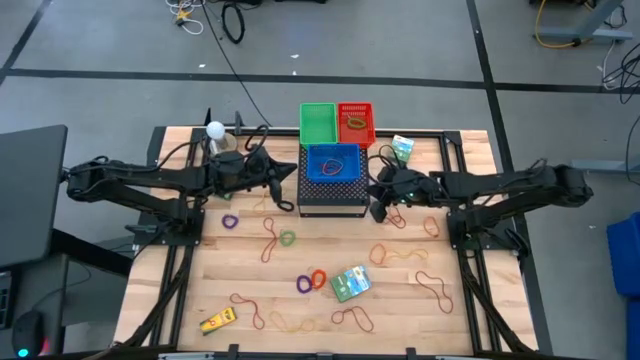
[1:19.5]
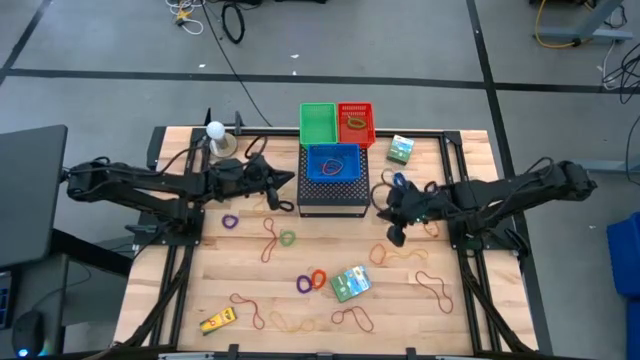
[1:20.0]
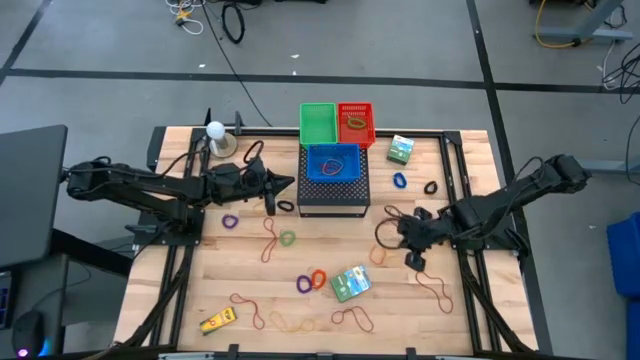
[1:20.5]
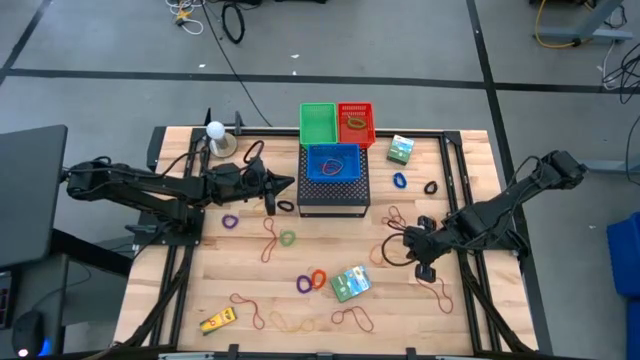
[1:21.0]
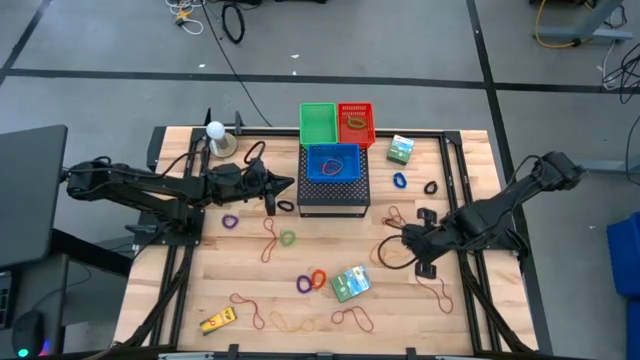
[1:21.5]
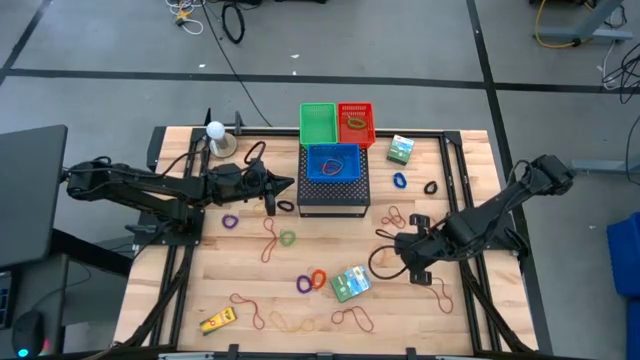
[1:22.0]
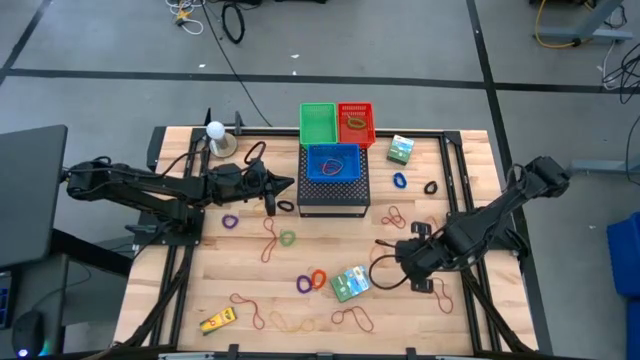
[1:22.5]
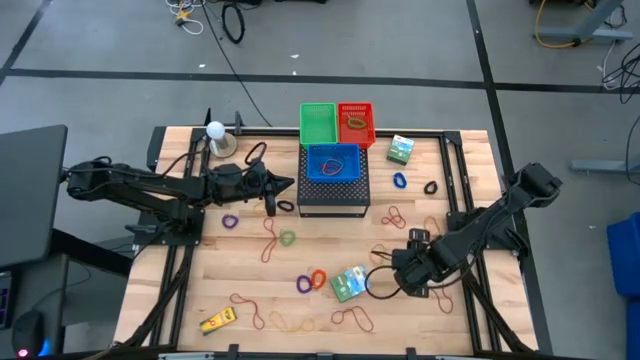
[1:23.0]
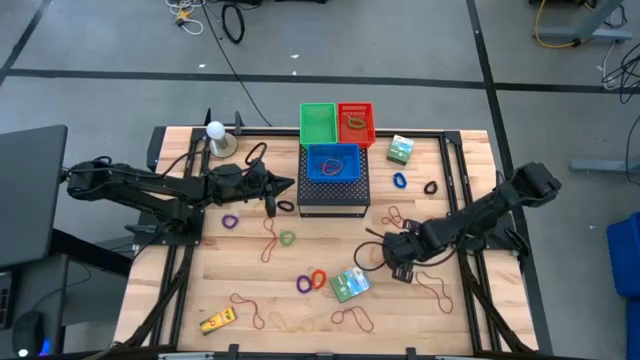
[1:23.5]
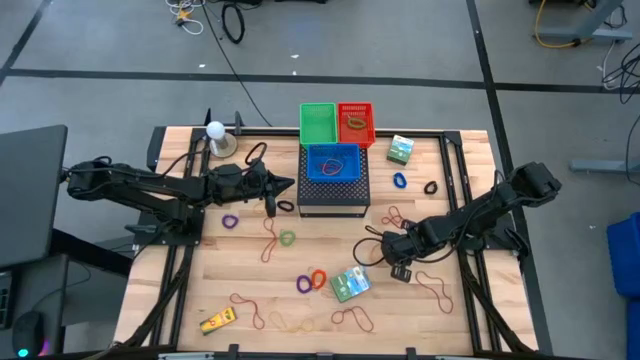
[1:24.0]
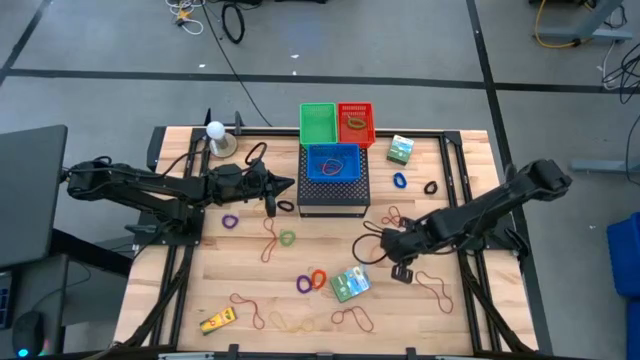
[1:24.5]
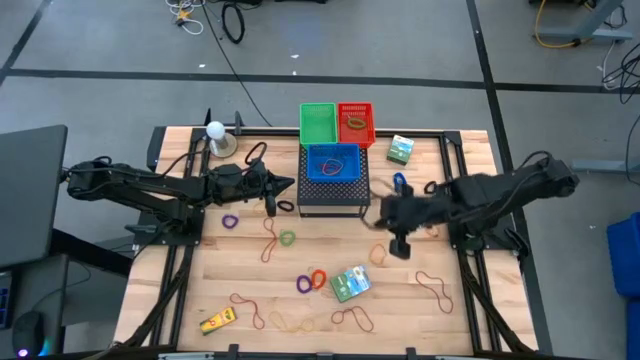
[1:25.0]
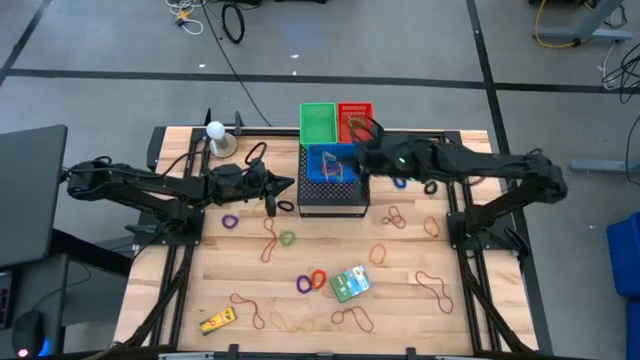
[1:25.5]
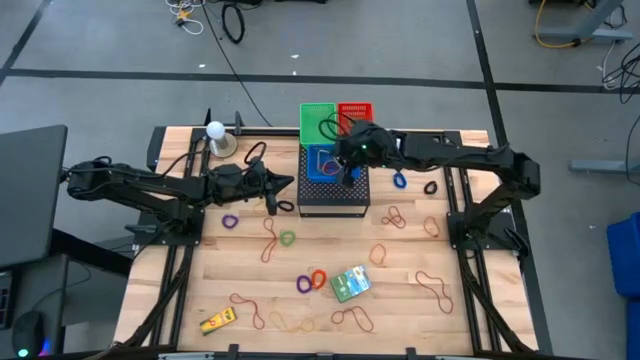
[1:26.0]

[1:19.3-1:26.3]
Task: Pick & Place Office Desk Supplies
Put the yellow rubber band into the blue bin on the shelf

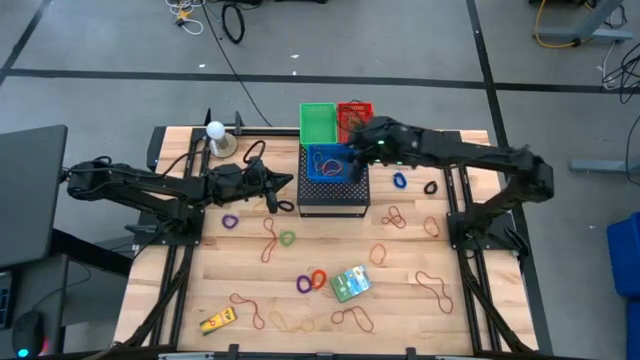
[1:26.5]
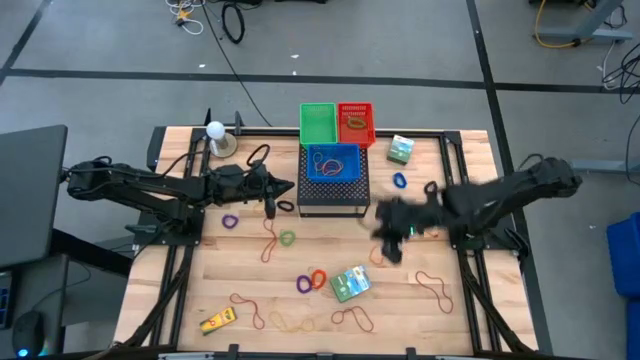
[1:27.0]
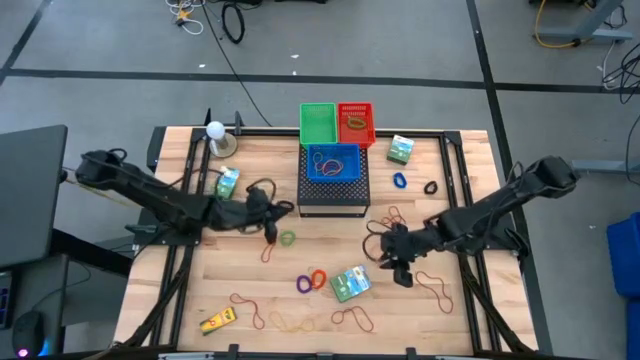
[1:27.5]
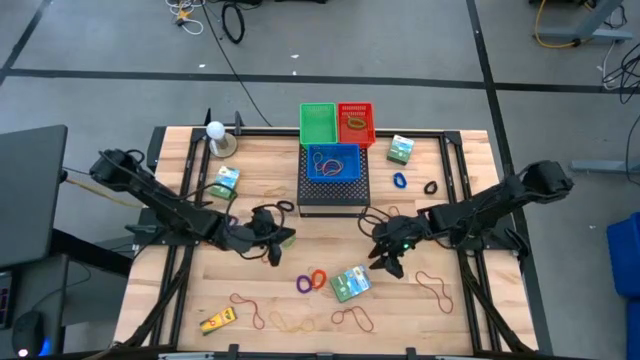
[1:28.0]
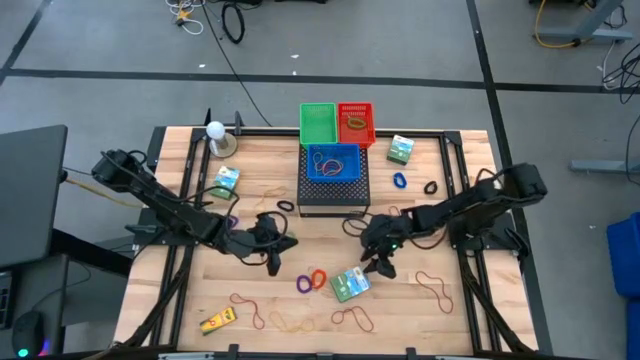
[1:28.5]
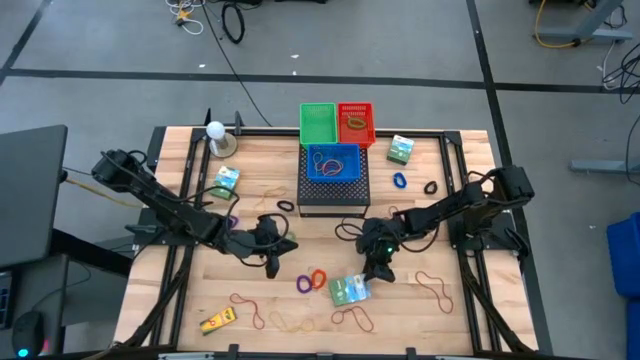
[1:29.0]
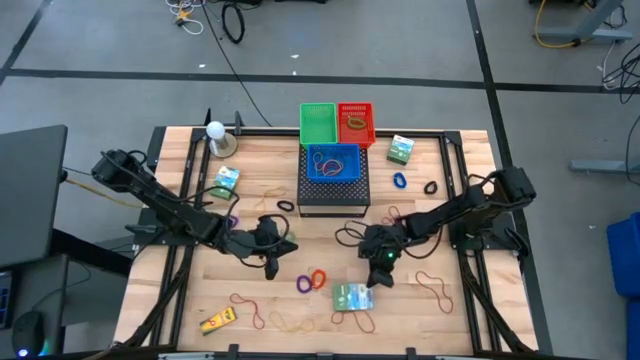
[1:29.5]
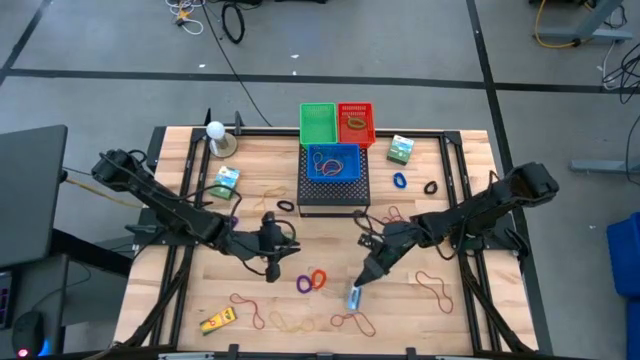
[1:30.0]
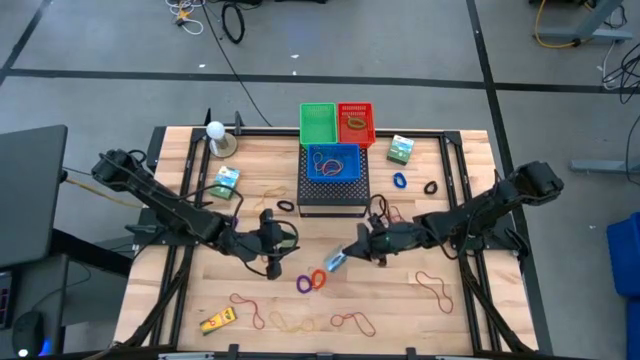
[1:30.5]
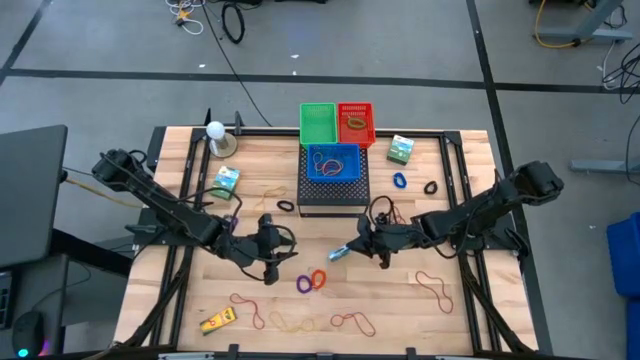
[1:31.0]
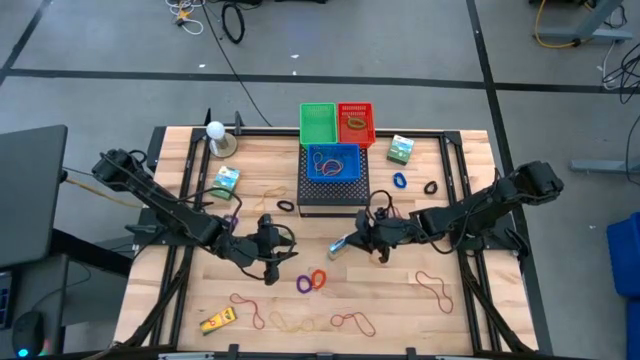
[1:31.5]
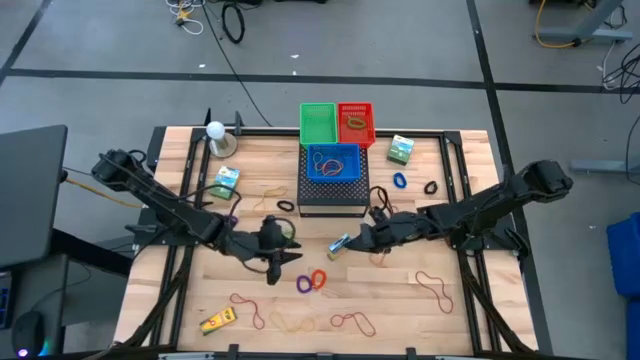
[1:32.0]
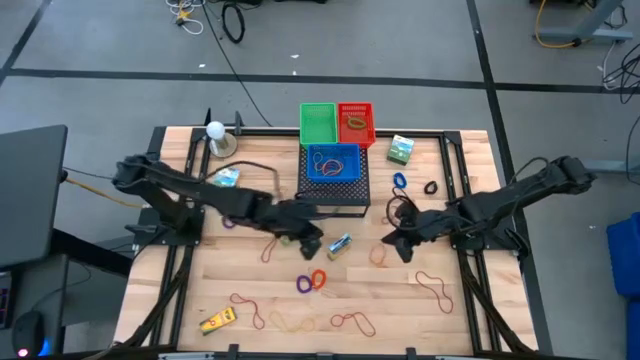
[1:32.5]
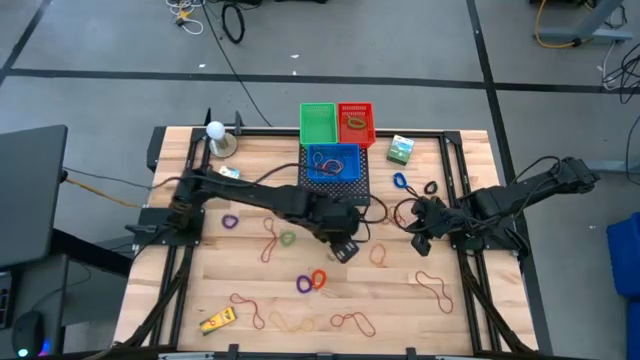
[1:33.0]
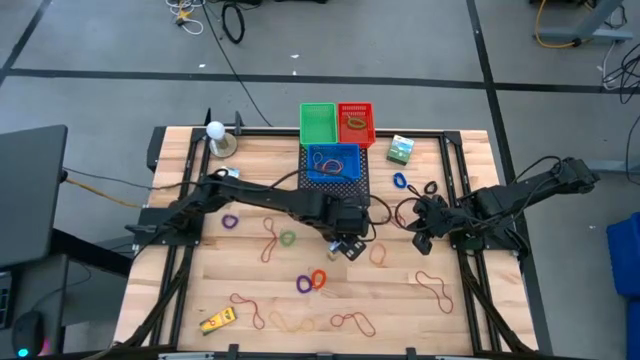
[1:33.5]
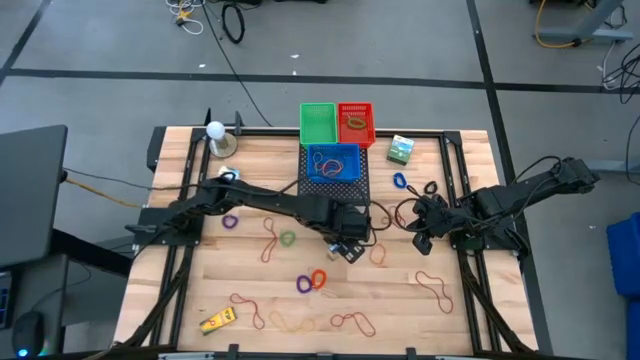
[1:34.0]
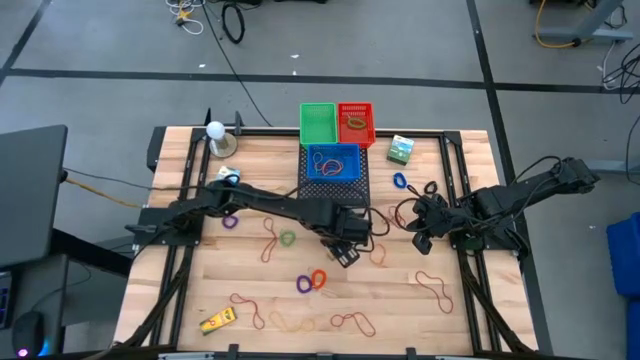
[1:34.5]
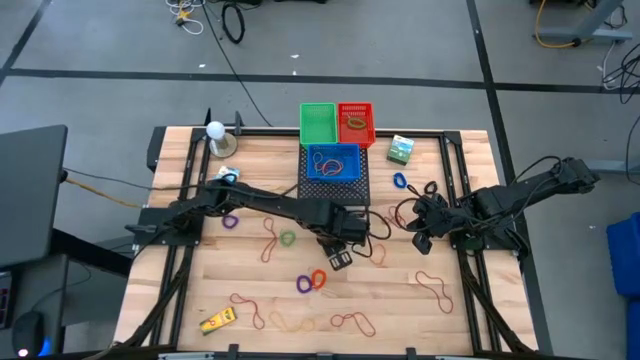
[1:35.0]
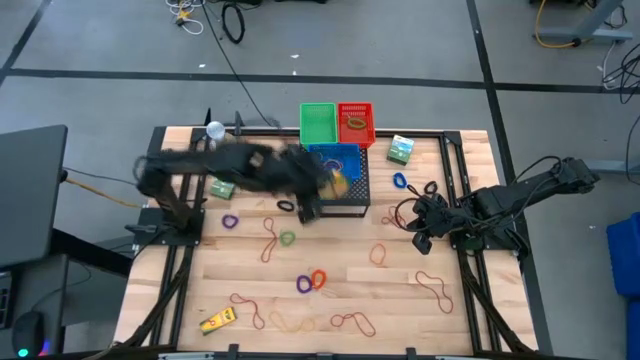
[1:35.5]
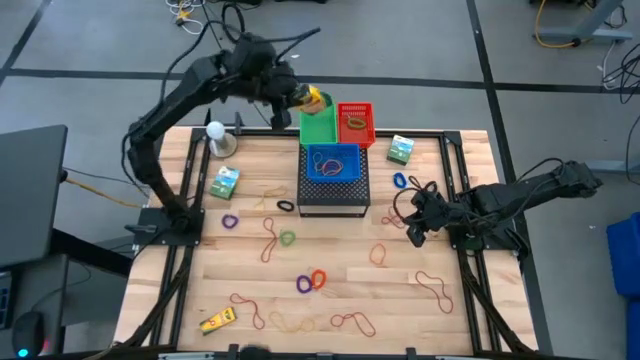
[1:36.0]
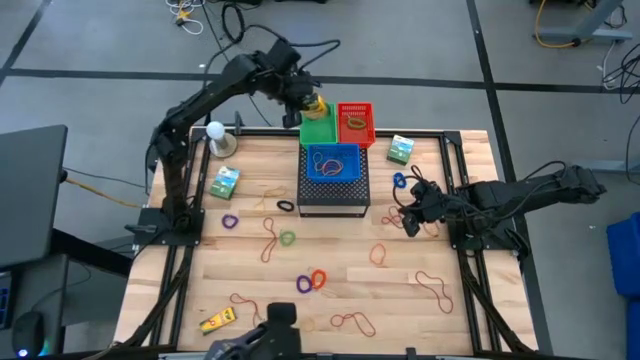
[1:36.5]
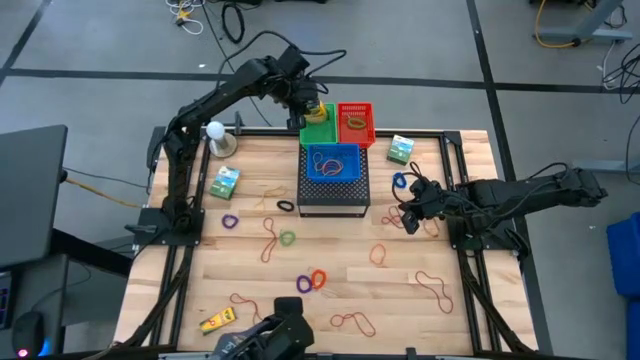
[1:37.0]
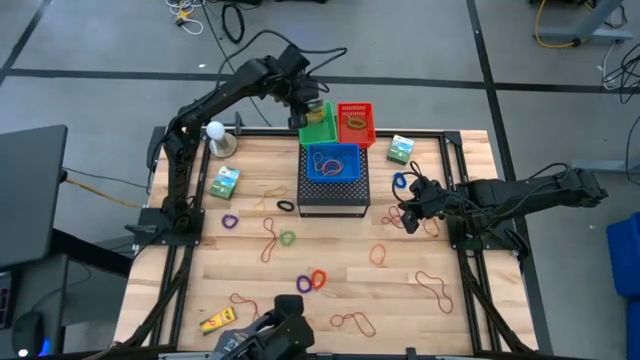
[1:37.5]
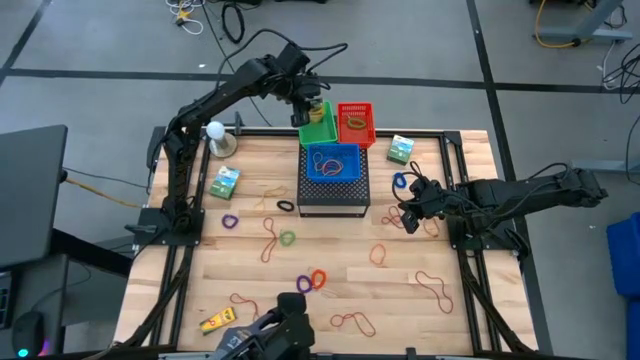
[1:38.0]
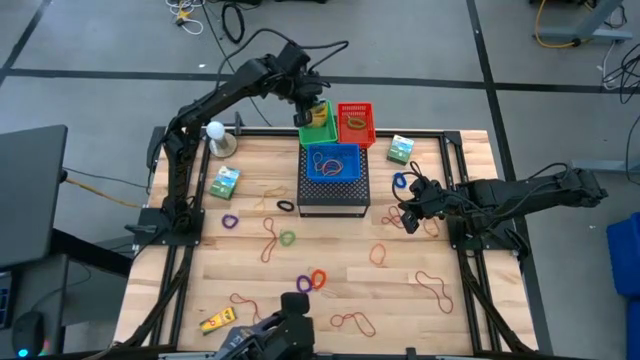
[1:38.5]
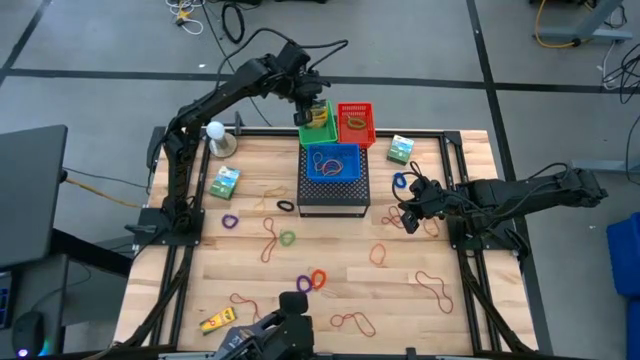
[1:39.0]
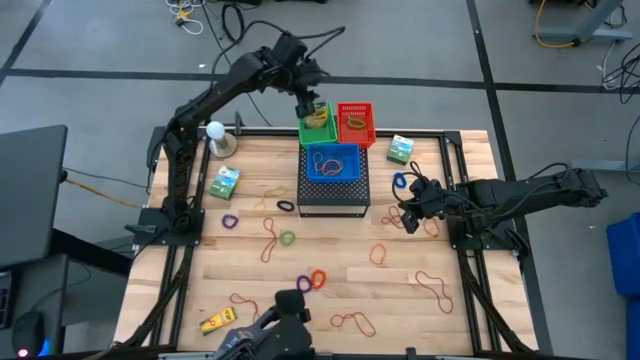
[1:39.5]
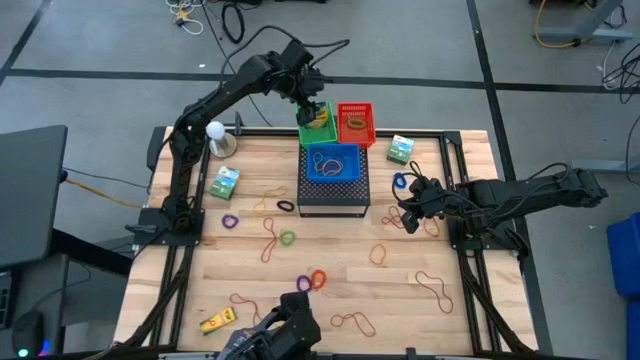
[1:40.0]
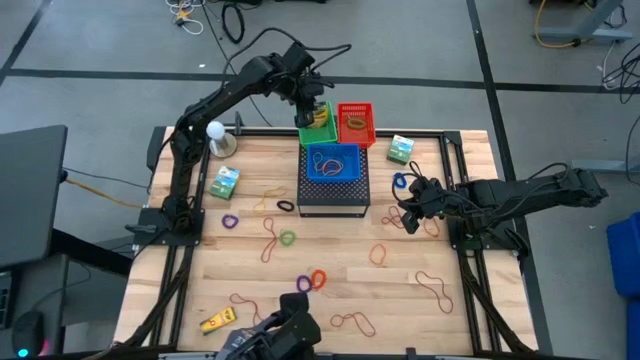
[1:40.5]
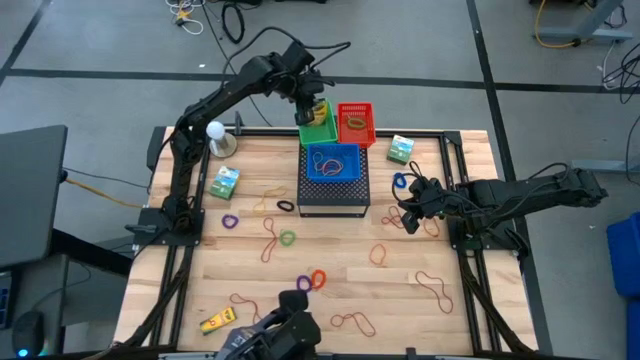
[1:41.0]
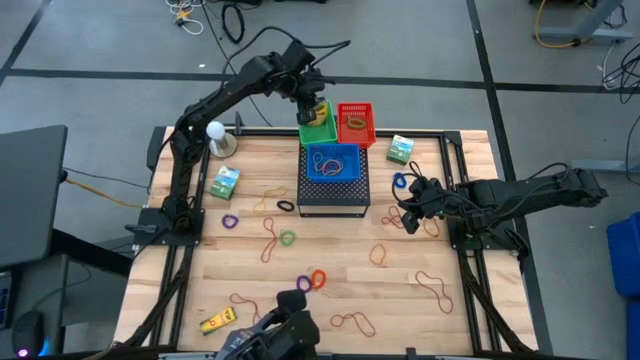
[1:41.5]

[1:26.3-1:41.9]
Put the box of crayon into the green bin on the shelf

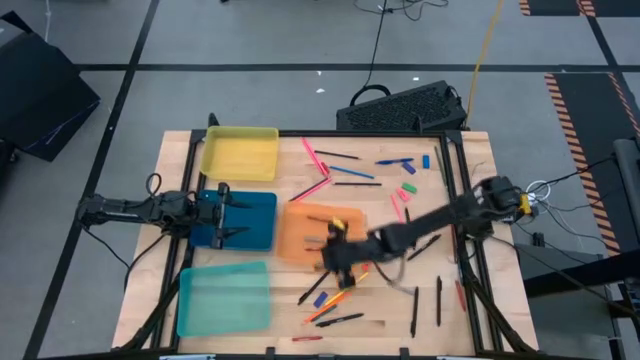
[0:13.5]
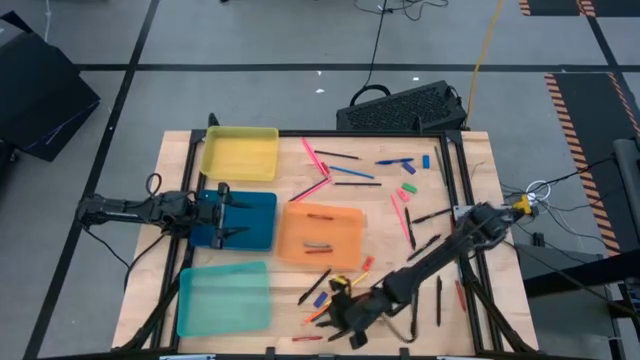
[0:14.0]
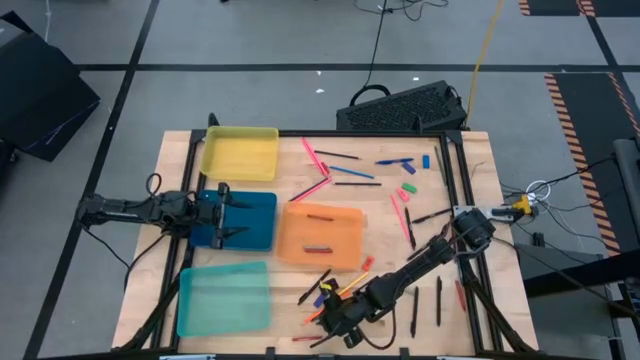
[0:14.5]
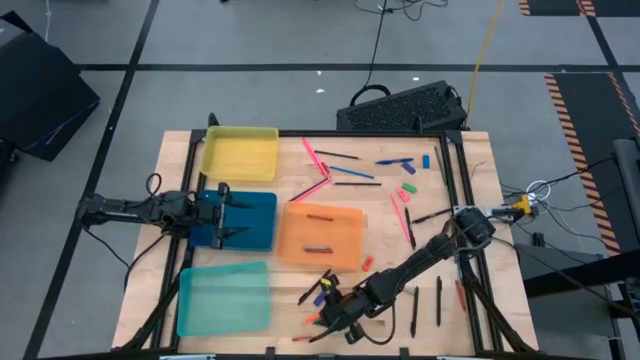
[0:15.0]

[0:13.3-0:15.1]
Task: Sort crayons/erasers/pens/pencils in bins
Put the green crayon into the orange bin
